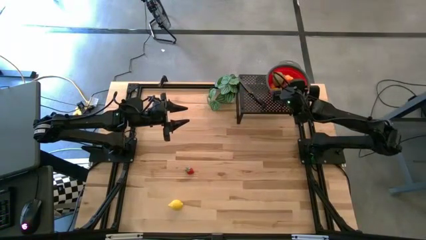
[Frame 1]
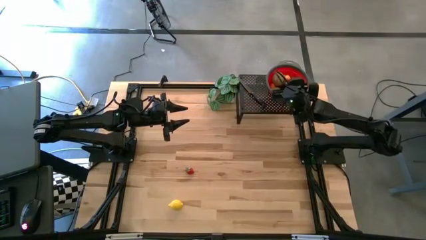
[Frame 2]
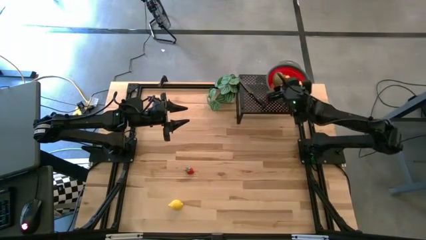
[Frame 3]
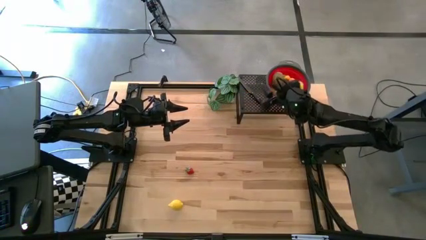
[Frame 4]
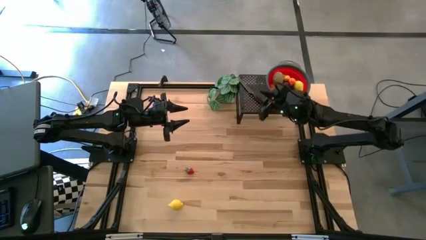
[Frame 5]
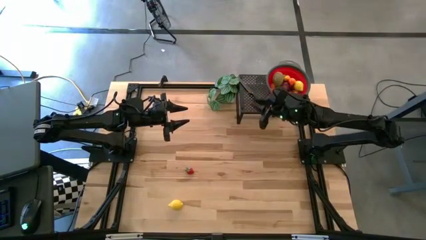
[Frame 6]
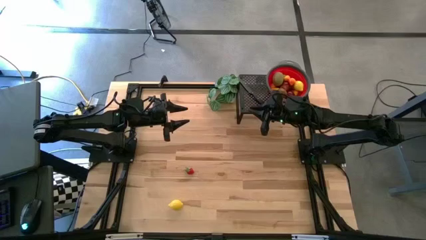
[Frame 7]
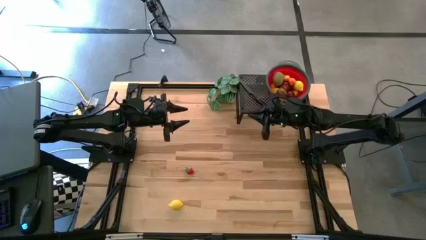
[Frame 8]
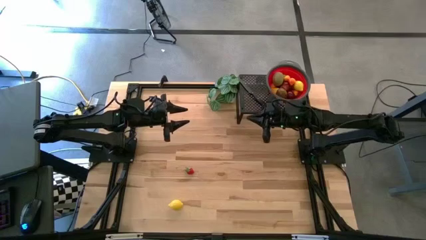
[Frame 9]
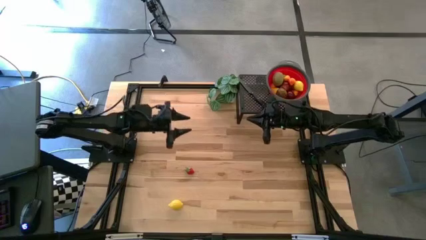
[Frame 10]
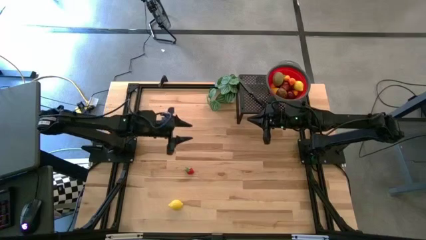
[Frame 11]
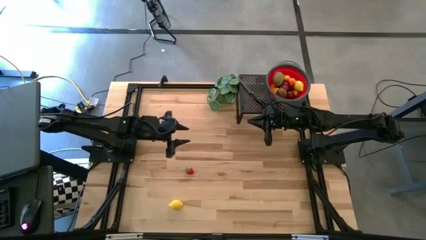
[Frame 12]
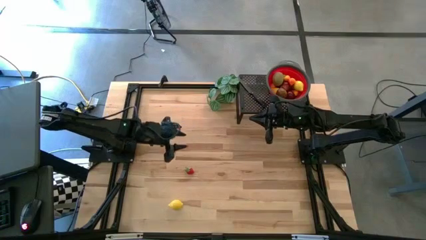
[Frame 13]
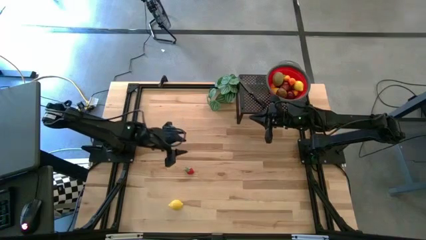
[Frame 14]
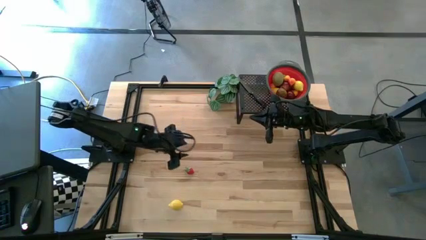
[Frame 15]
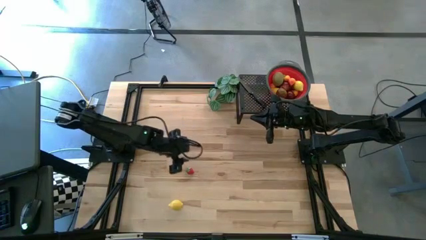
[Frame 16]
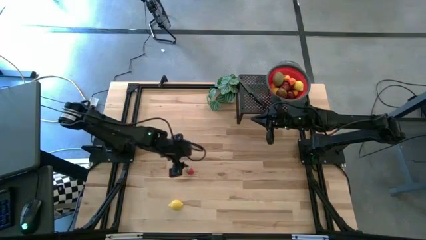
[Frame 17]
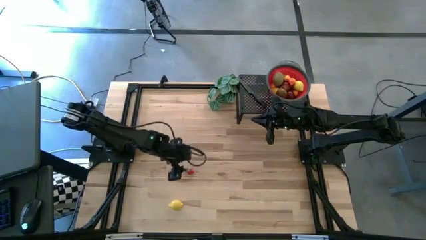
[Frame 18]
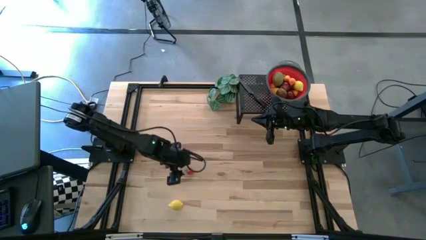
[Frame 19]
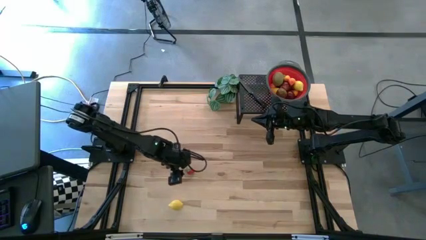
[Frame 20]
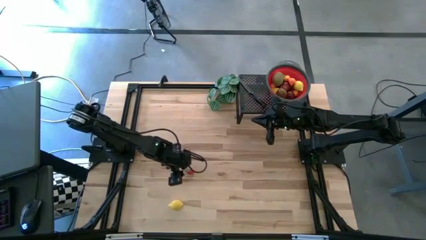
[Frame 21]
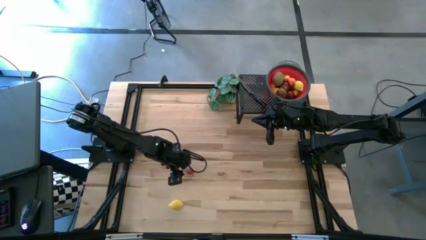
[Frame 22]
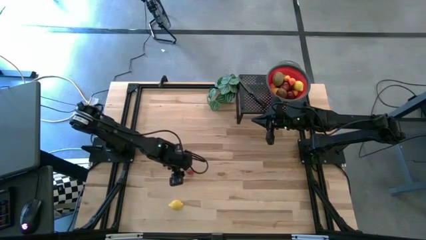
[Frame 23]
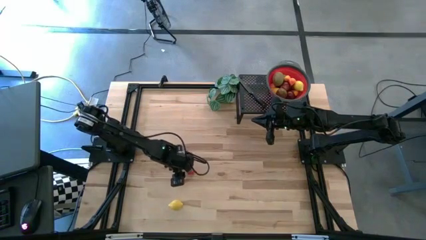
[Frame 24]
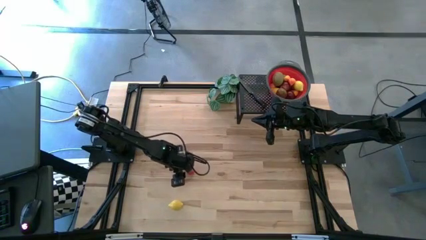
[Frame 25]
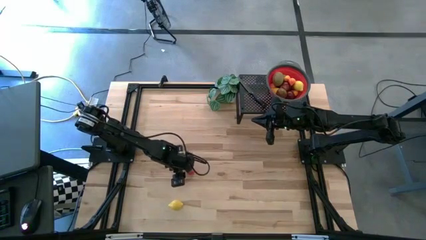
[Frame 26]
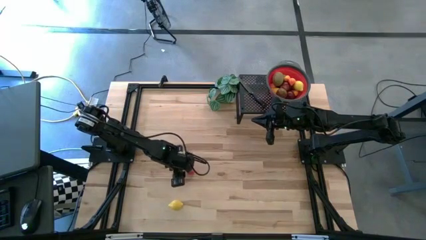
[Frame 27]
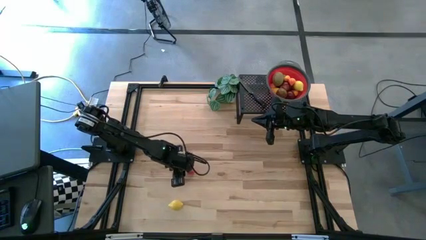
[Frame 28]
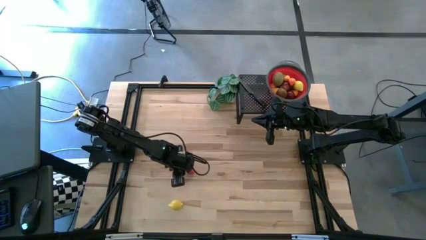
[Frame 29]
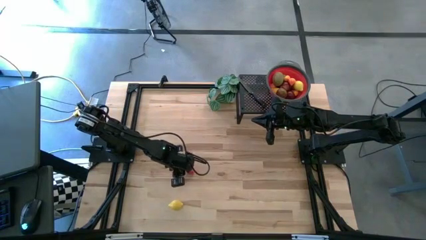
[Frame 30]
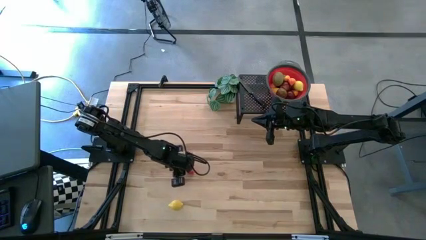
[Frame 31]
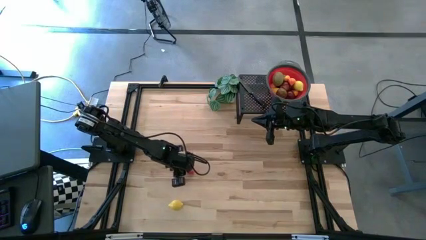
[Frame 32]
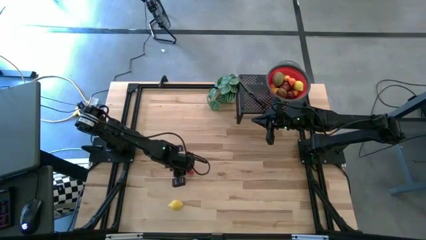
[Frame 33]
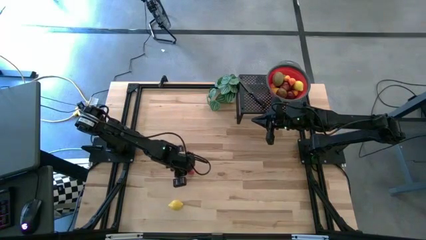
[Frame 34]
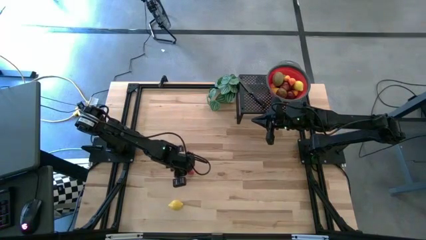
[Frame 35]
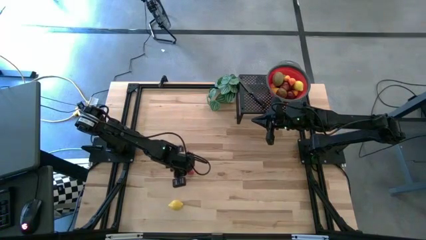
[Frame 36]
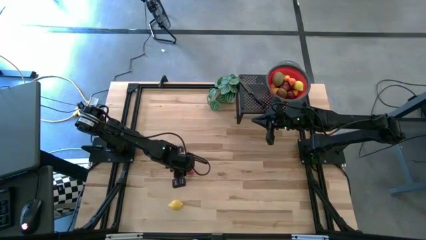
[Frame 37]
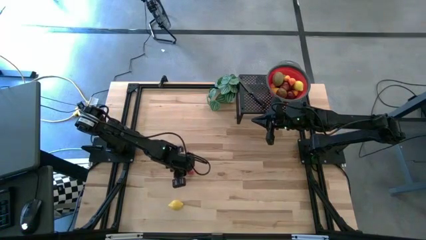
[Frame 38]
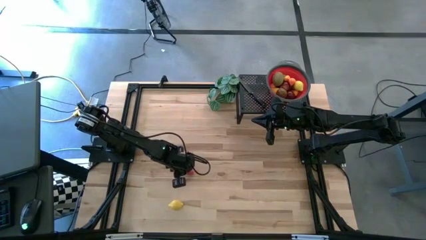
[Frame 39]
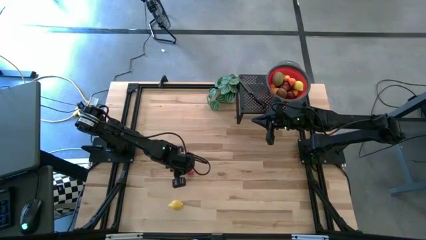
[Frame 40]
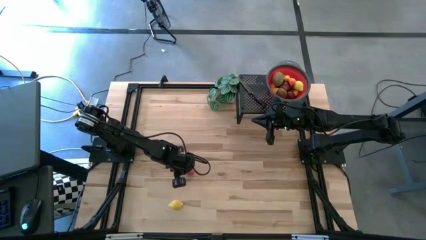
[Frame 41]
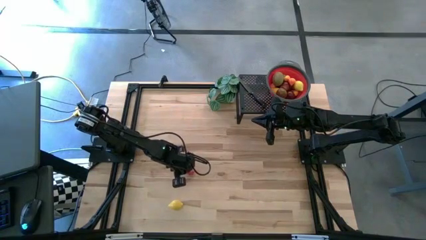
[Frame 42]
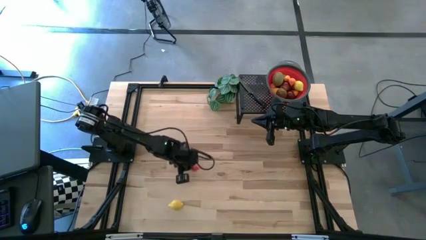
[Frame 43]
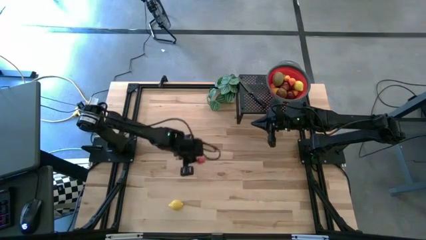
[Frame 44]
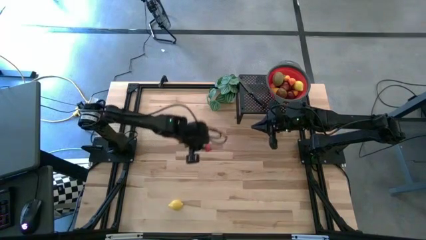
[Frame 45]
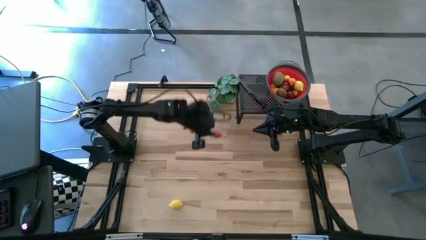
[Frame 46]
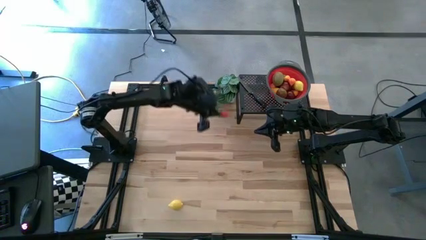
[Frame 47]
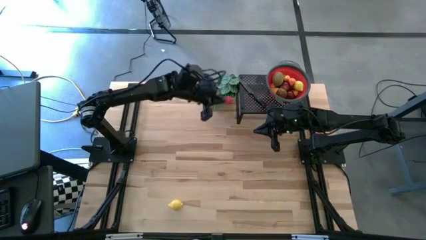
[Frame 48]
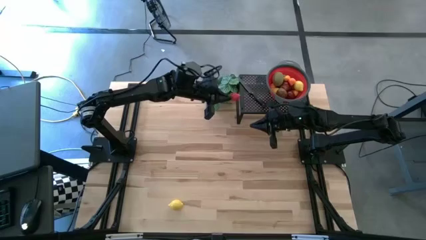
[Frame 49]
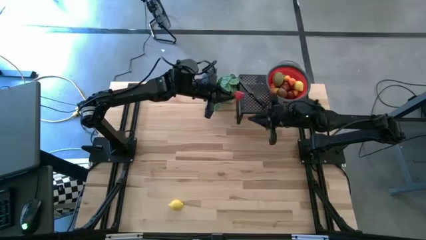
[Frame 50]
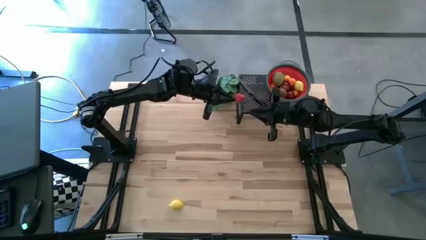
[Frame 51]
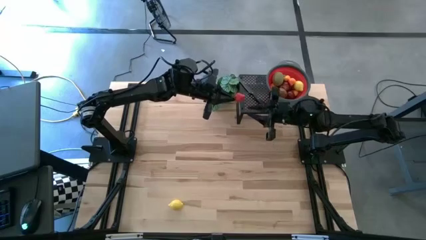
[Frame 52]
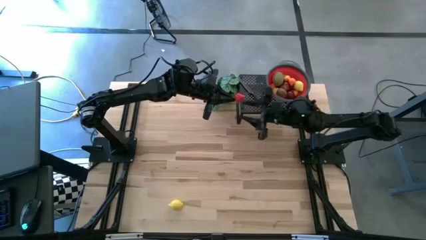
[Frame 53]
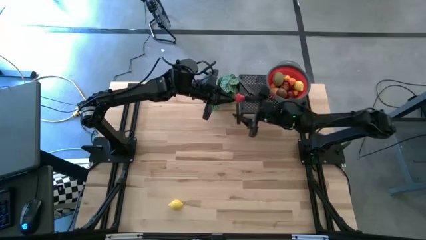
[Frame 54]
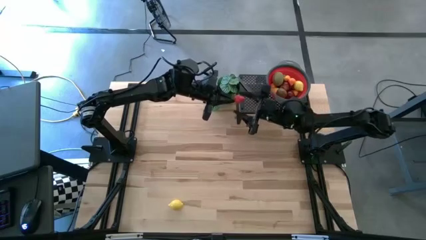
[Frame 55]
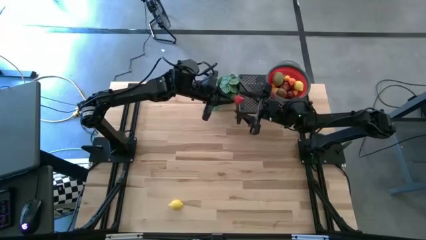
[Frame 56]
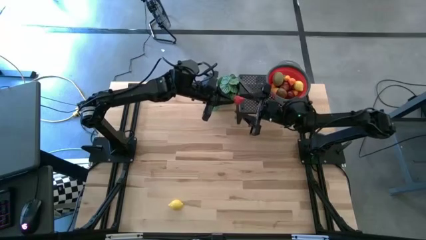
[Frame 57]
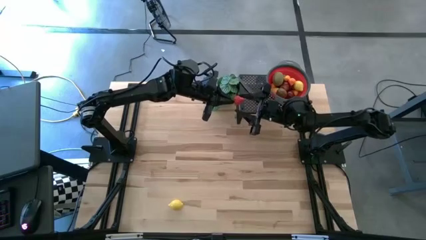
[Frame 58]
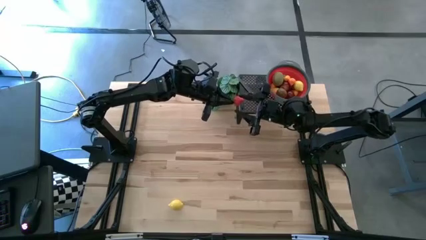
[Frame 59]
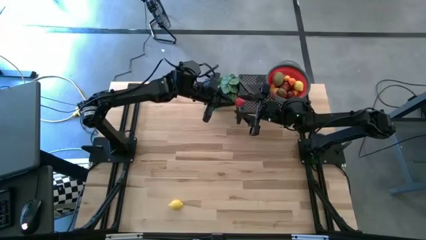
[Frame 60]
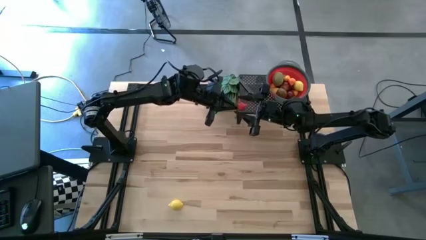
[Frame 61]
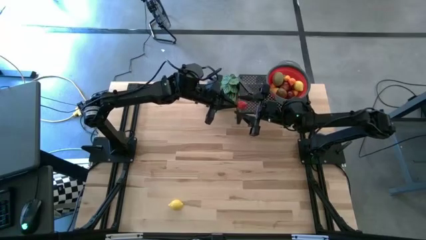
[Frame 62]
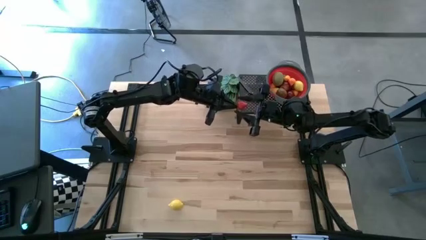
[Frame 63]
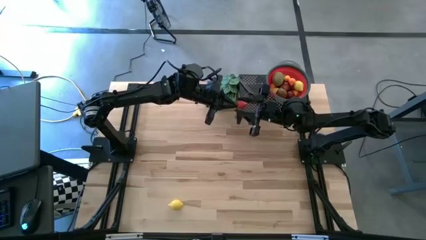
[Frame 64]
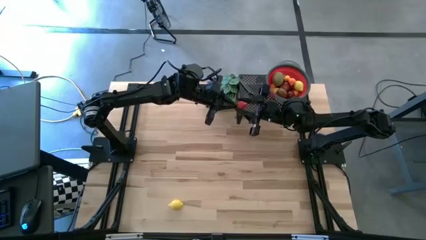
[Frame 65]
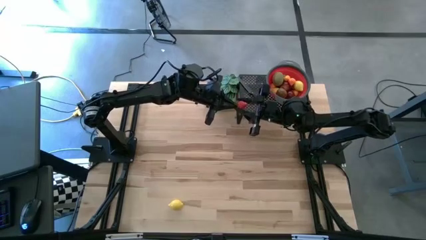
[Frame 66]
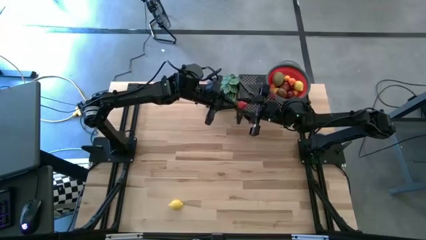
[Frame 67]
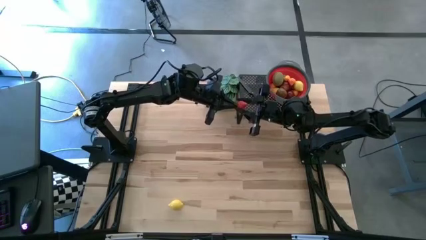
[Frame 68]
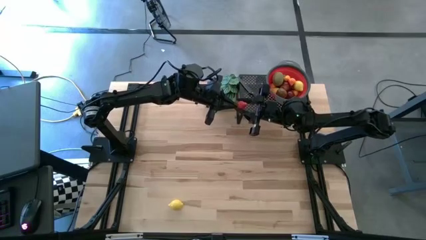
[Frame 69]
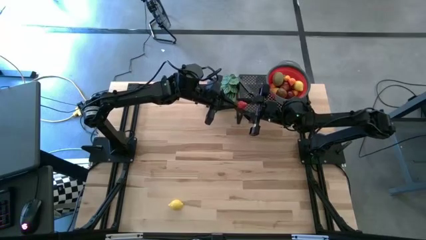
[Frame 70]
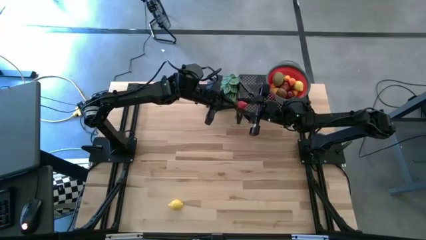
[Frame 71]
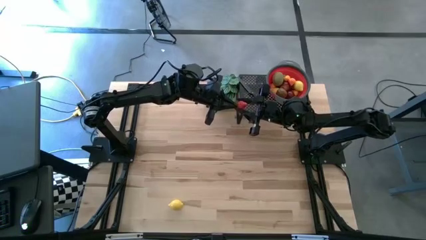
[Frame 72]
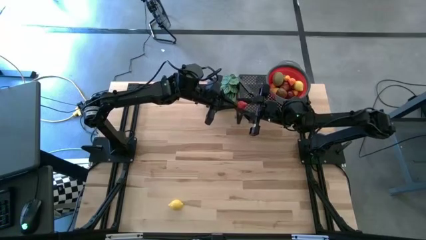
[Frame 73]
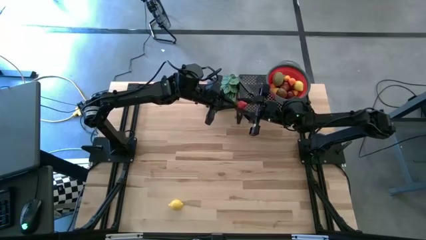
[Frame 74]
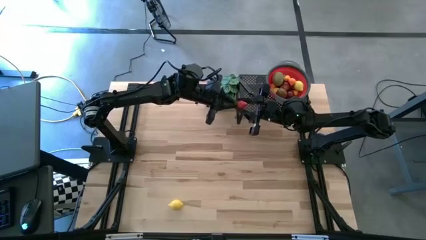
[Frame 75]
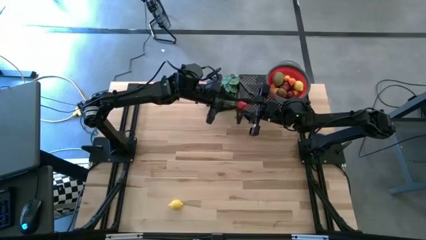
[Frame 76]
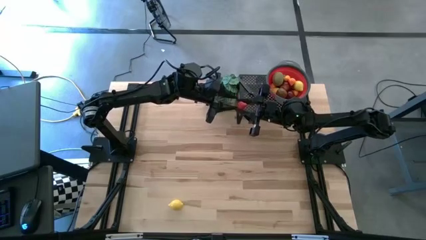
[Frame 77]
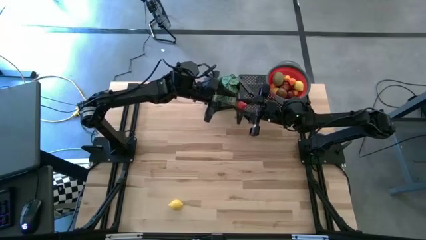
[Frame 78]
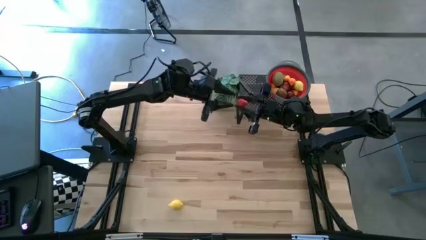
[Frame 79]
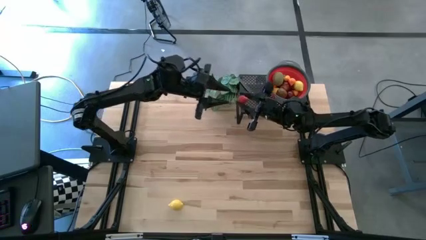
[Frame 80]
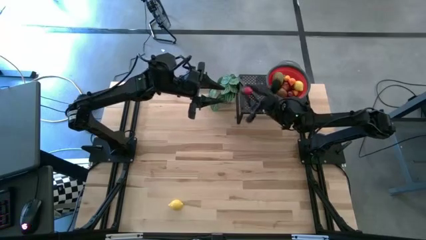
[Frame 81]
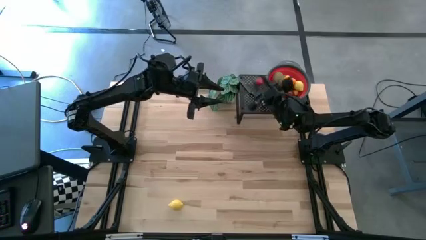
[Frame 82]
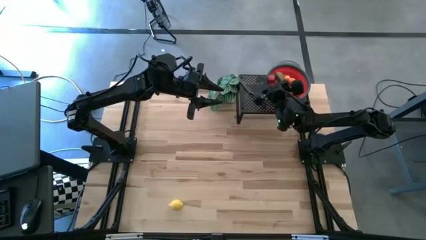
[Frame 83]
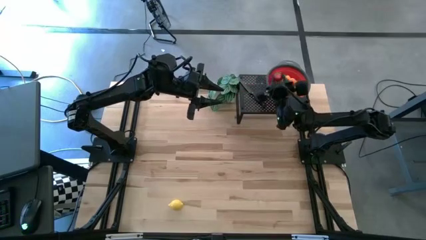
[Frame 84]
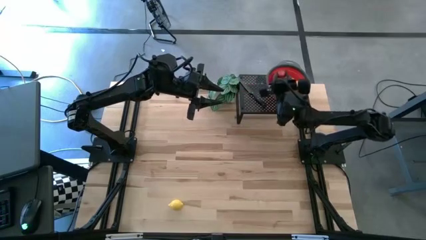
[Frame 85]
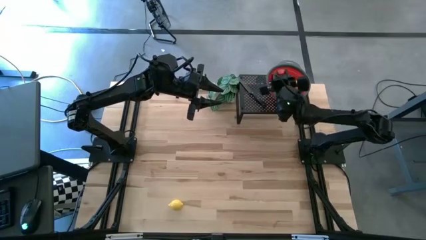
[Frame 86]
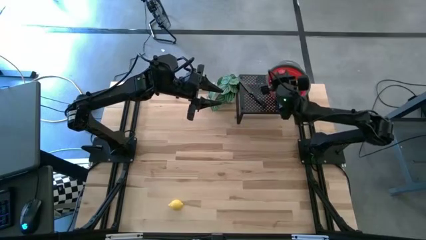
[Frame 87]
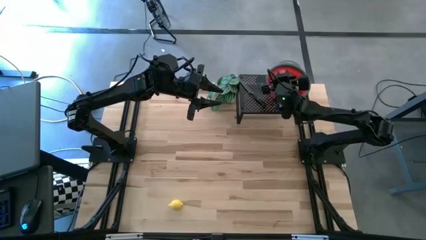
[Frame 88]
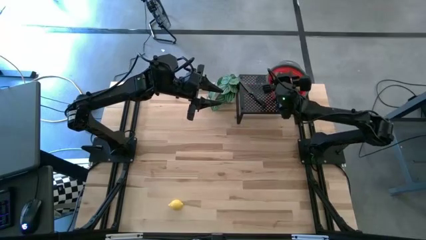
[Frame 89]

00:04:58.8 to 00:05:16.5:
Task: Pick & Place Fruit
Put the red strawberry into the red strainer bowl
